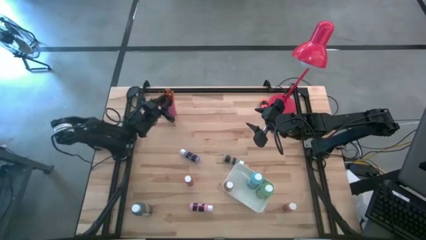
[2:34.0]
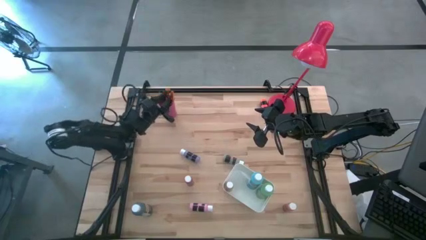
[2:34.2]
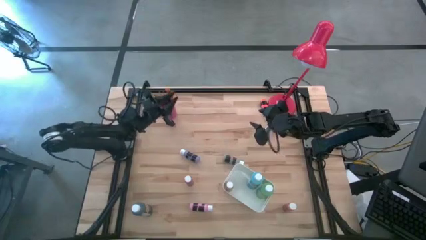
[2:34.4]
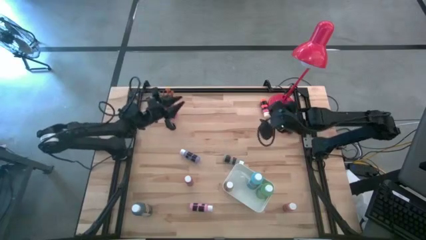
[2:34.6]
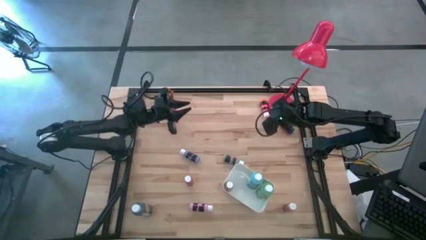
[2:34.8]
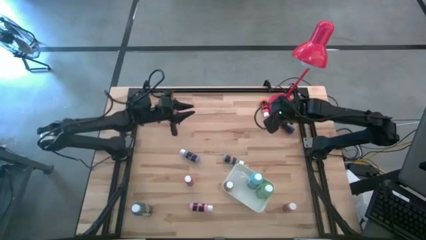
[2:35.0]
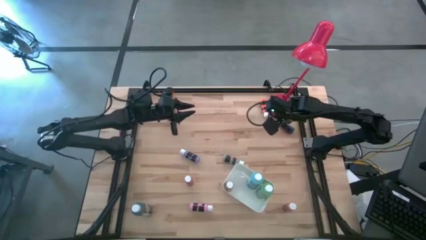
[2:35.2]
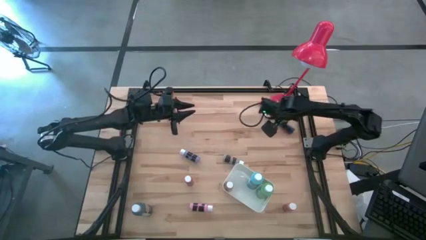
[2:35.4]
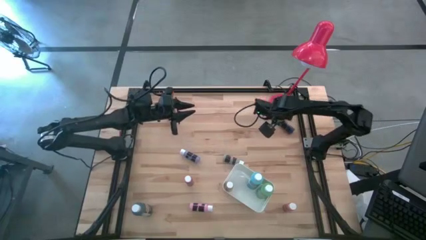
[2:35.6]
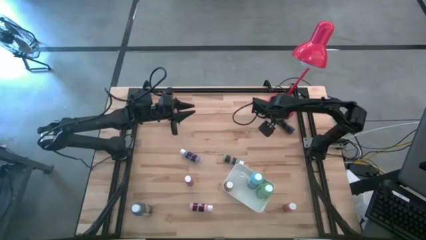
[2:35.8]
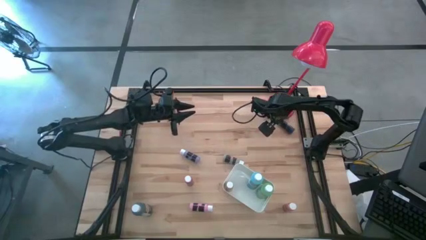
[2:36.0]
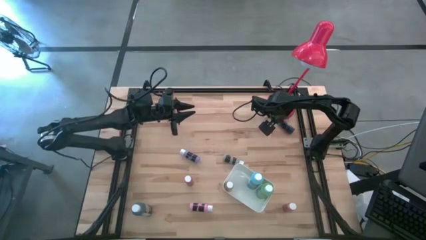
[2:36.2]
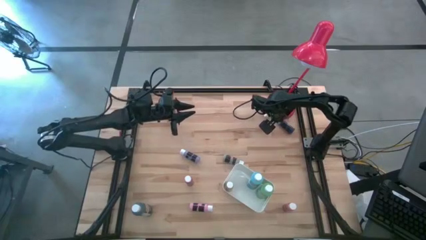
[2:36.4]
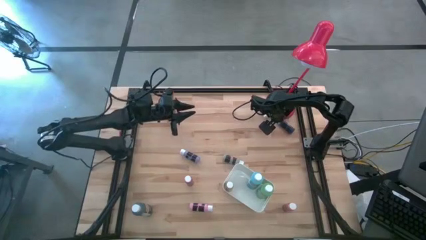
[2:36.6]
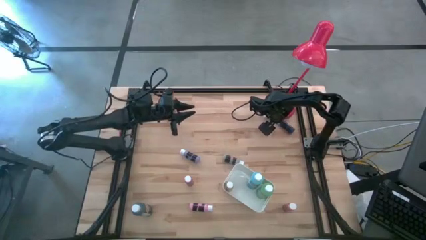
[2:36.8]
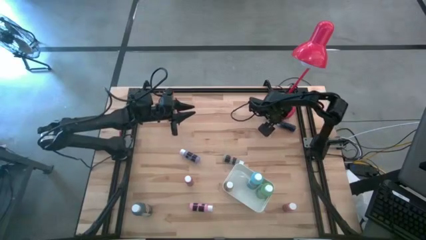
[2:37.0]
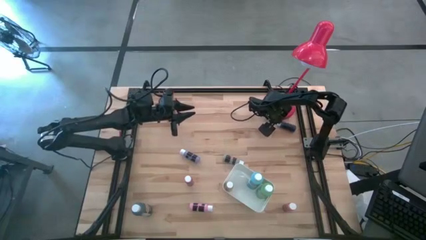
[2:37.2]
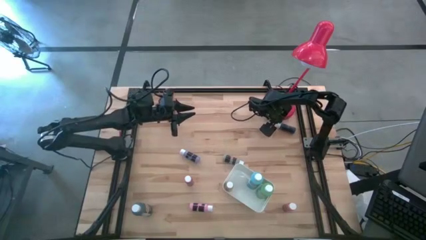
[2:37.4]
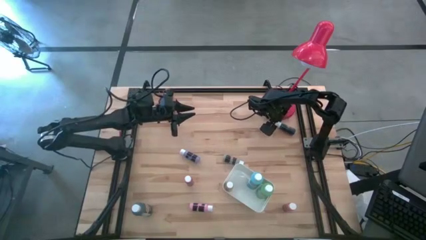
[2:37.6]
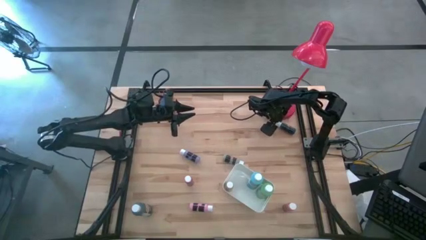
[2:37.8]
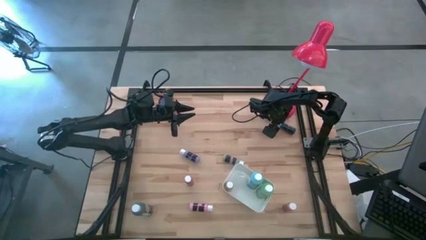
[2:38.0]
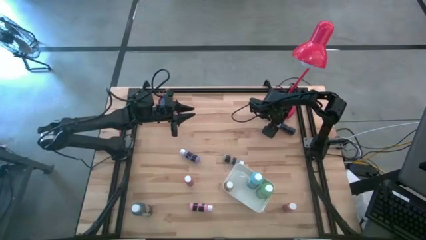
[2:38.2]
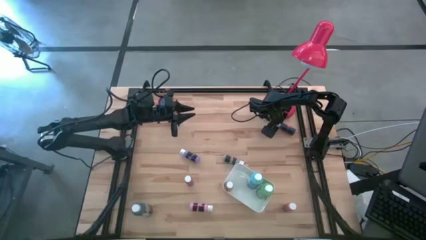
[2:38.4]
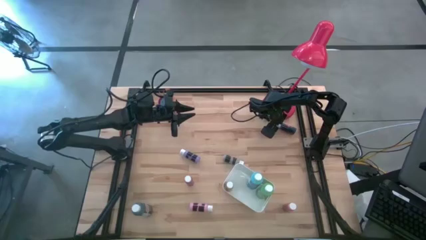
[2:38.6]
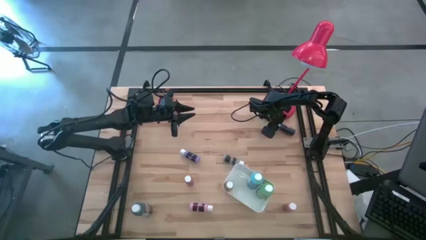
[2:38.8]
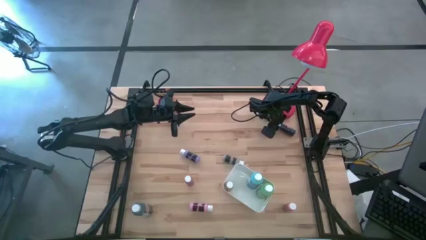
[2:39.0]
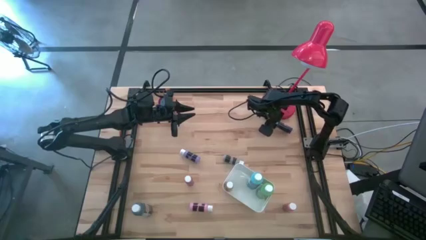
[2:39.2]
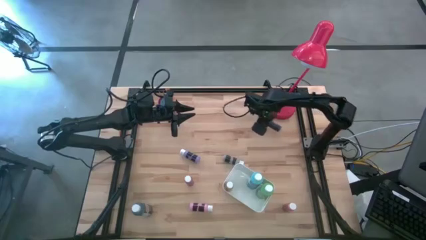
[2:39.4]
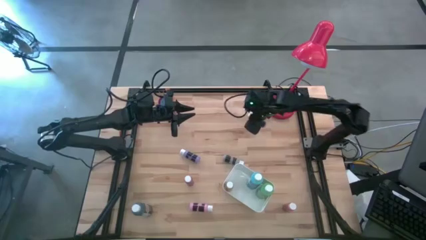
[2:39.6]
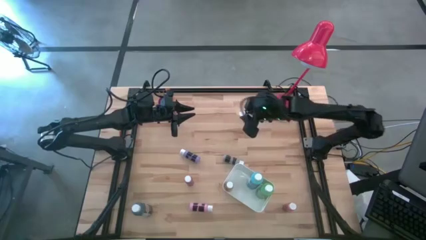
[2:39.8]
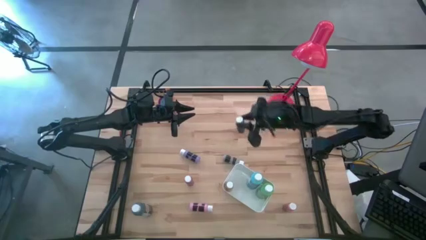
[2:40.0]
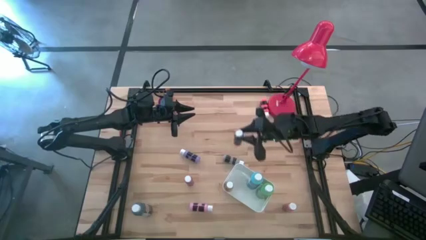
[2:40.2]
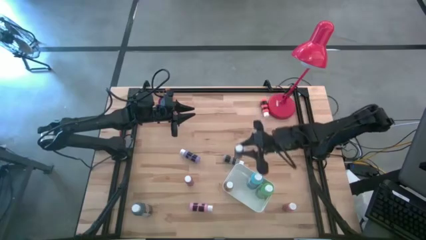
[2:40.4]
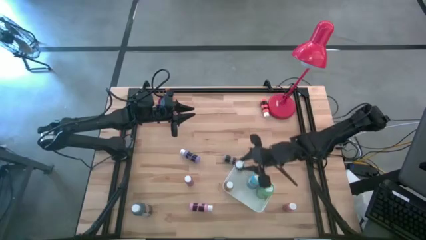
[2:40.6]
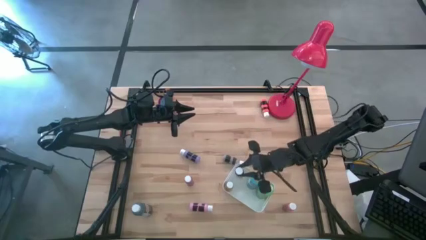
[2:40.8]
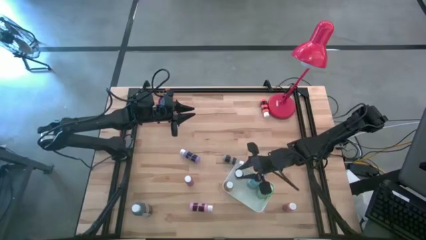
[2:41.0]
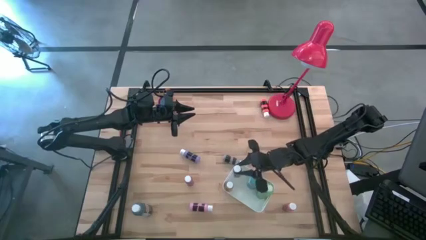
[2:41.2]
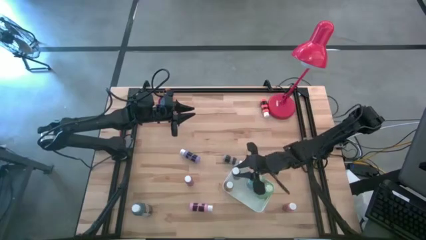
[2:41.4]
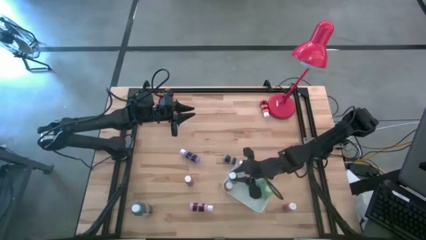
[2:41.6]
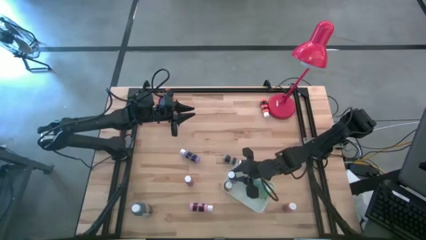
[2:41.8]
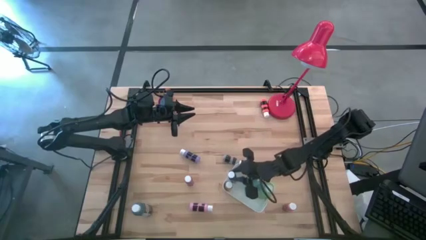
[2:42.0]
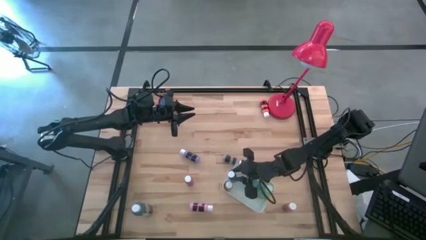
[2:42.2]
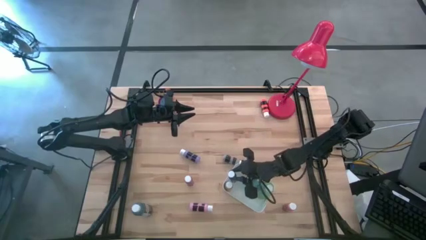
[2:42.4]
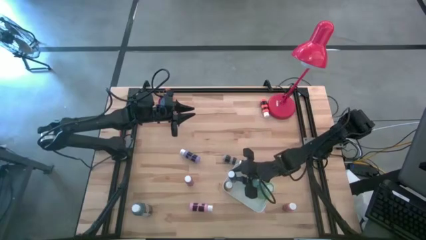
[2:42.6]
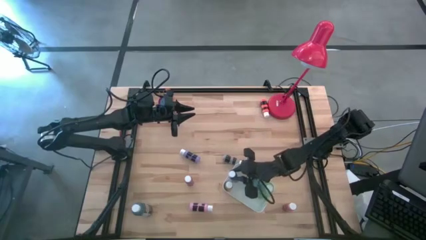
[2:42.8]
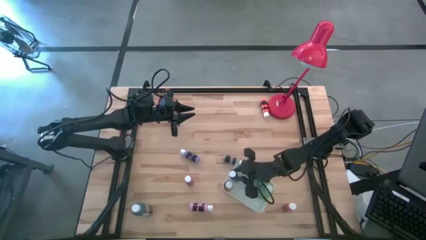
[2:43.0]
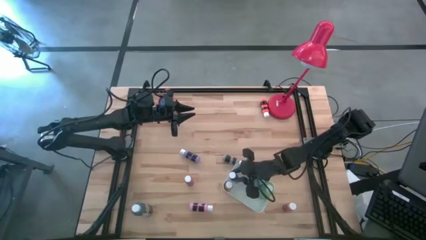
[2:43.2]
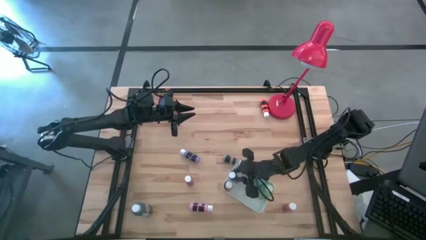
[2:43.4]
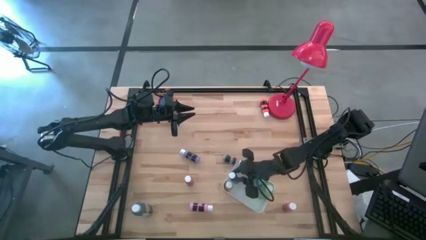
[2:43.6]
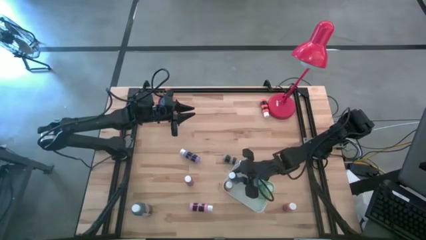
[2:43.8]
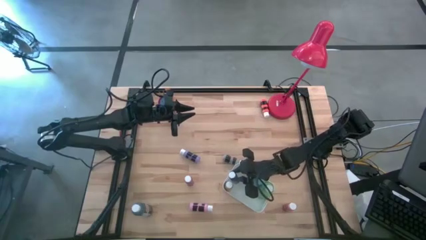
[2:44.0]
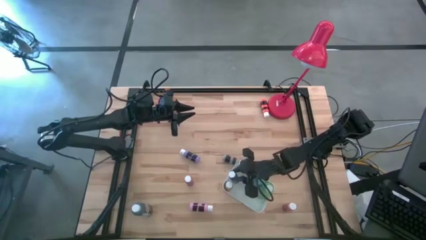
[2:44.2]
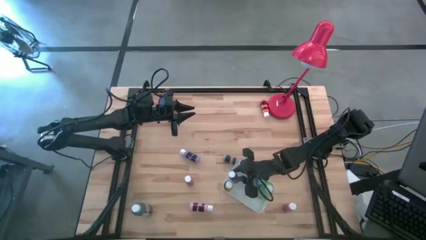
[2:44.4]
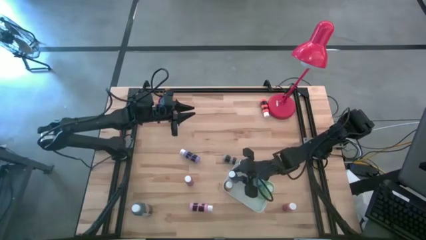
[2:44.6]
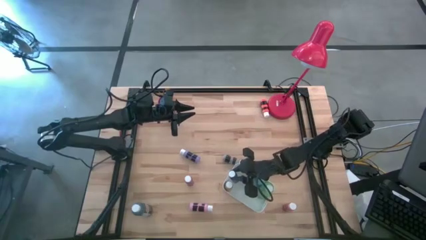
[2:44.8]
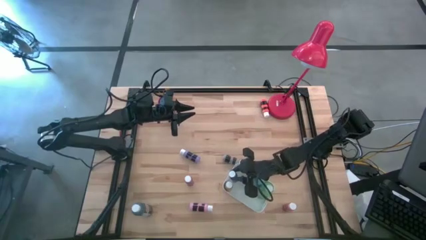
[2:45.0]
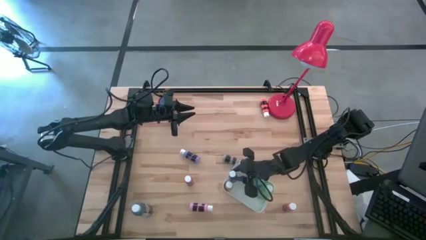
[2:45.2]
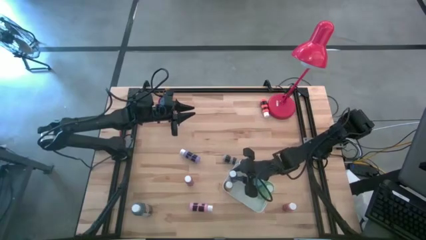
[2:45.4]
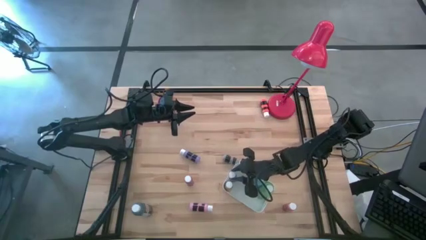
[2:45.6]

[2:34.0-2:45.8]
Task: Pick & Place Paint Supplies
Put the blue paint bottle into the white bin
